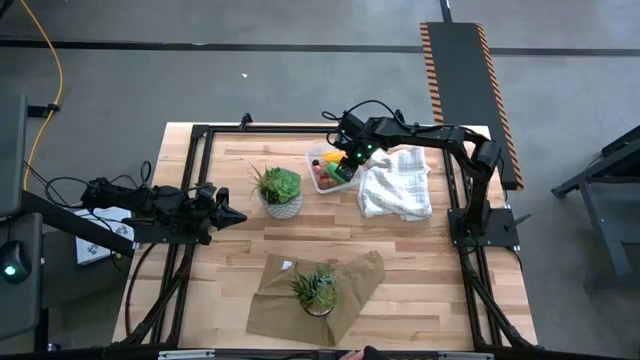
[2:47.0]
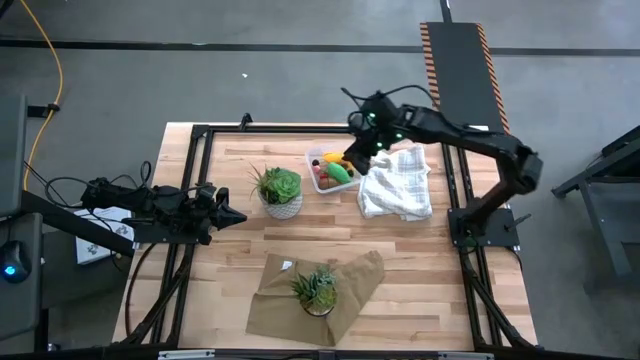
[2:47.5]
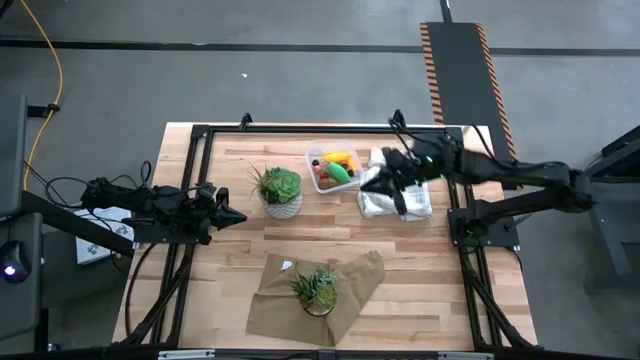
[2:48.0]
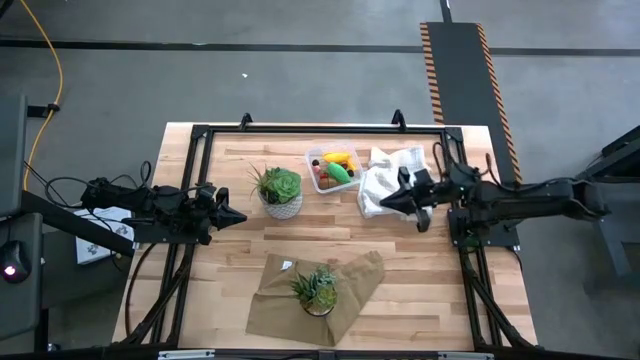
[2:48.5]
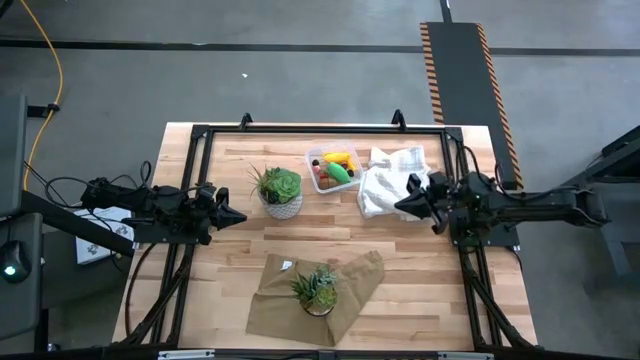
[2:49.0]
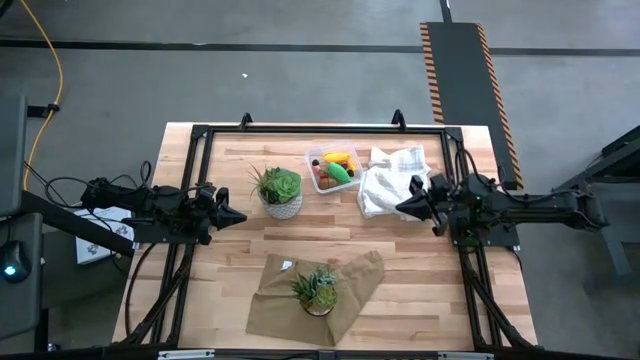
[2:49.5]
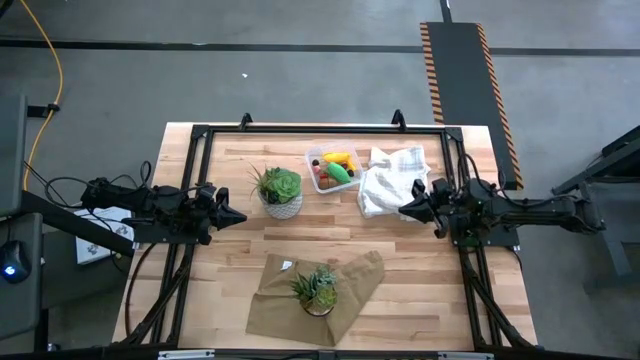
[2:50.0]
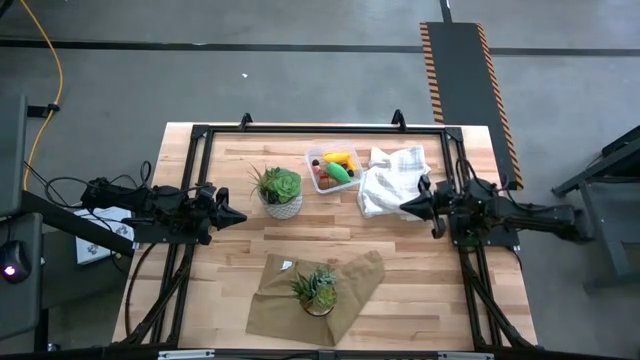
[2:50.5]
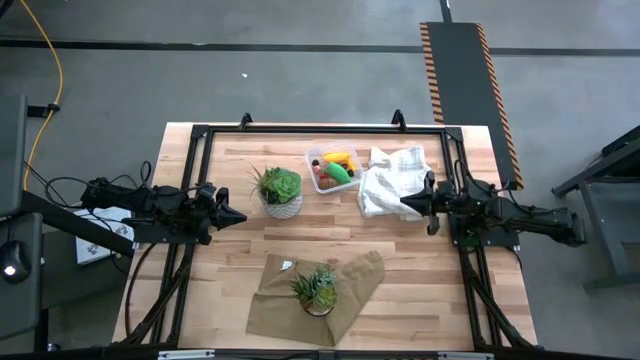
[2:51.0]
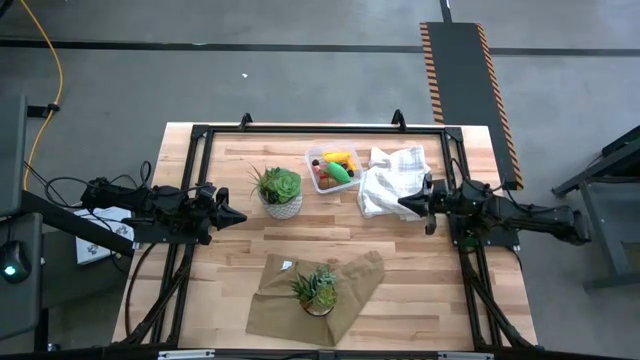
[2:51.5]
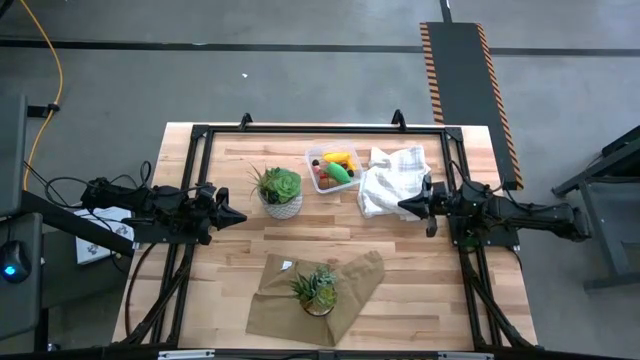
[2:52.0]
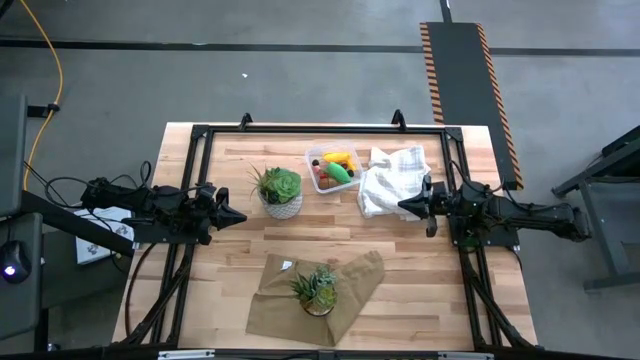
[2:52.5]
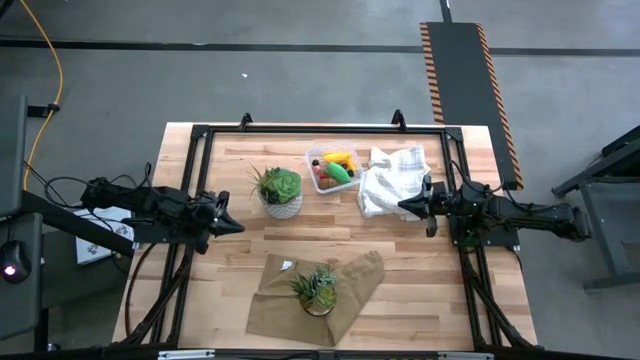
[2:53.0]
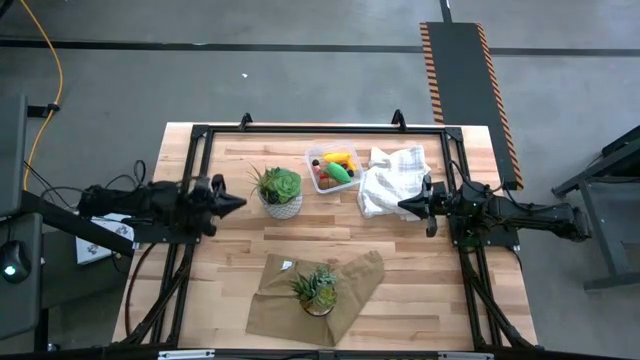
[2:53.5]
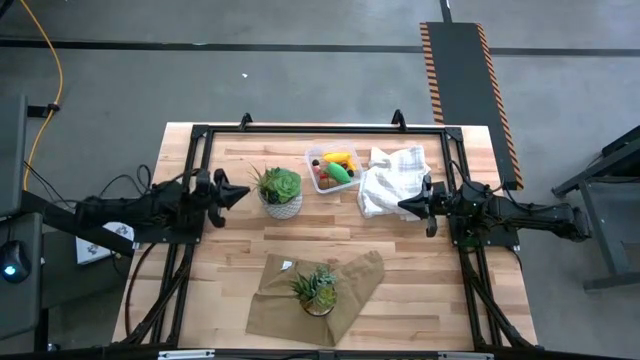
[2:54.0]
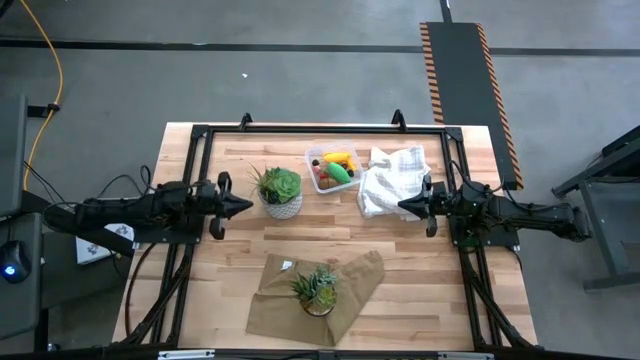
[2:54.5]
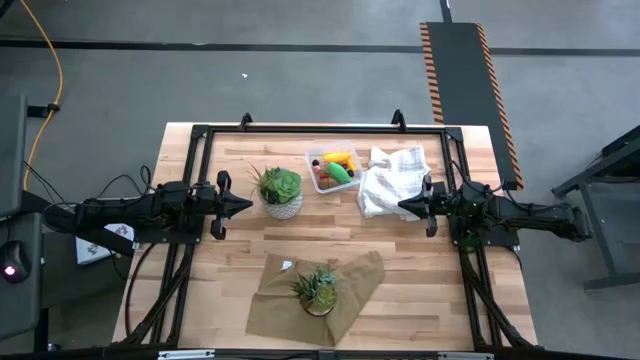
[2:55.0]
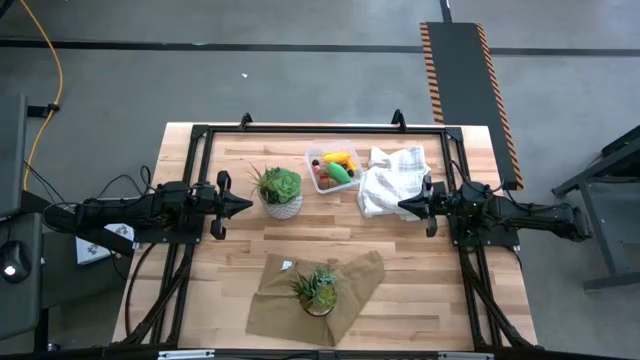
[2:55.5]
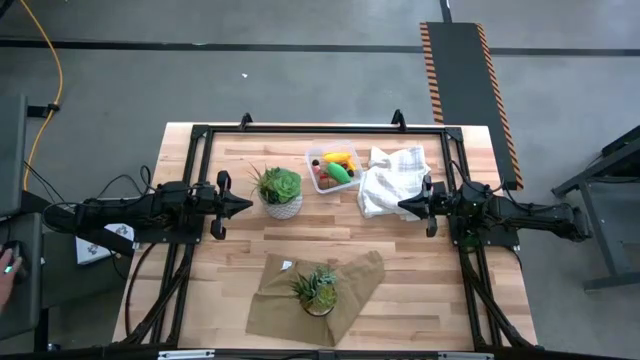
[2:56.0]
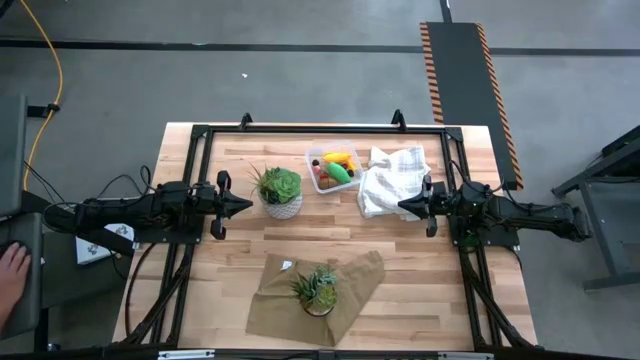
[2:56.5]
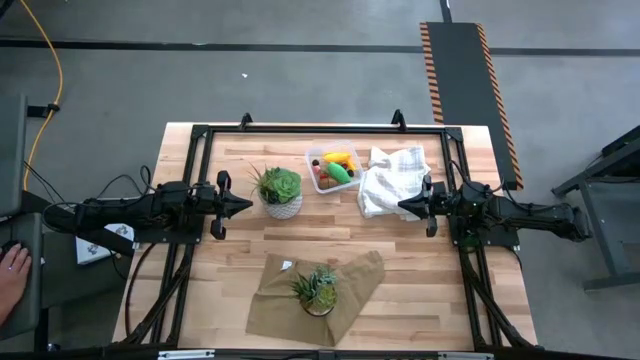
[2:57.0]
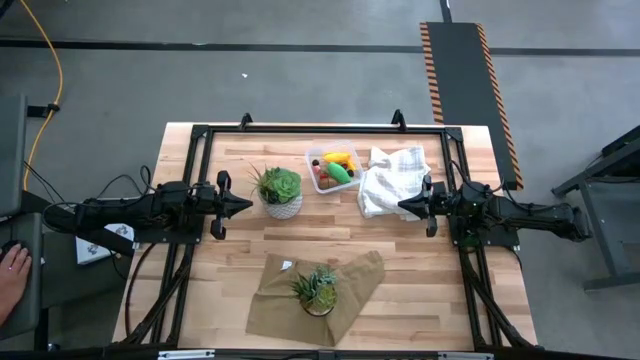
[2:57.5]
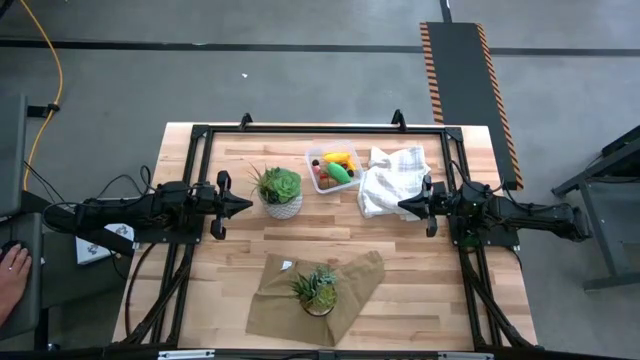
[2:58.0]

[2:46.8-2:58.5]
Task: Pick and placing Produce into tupperware
Return to Home Position

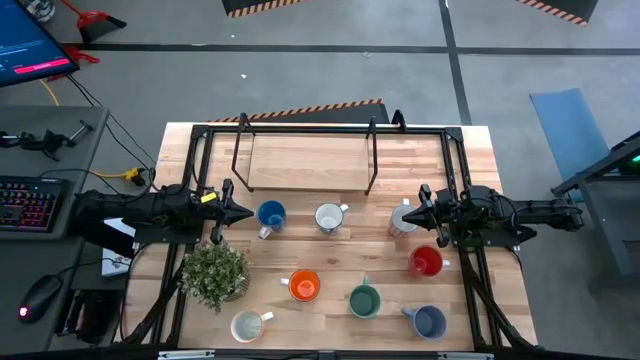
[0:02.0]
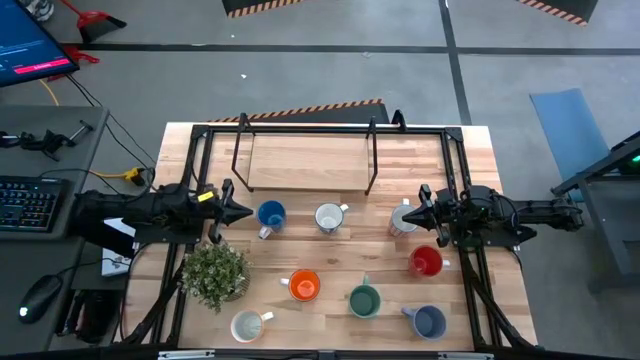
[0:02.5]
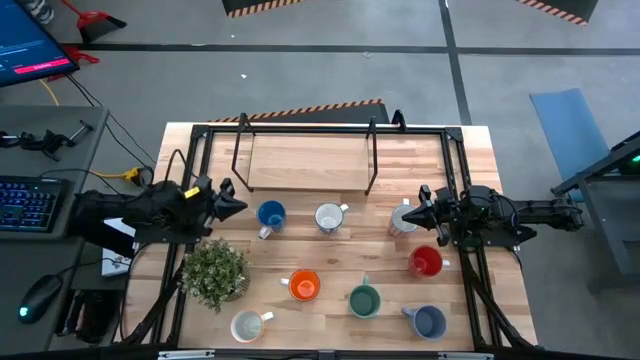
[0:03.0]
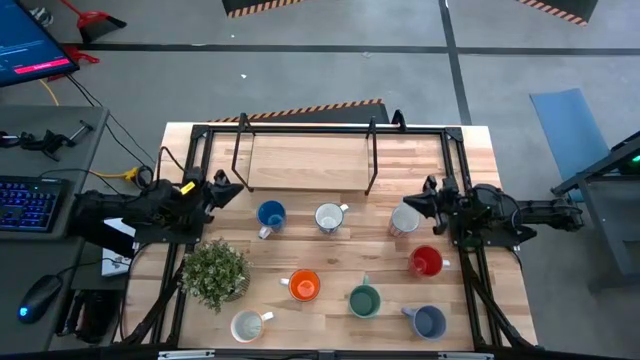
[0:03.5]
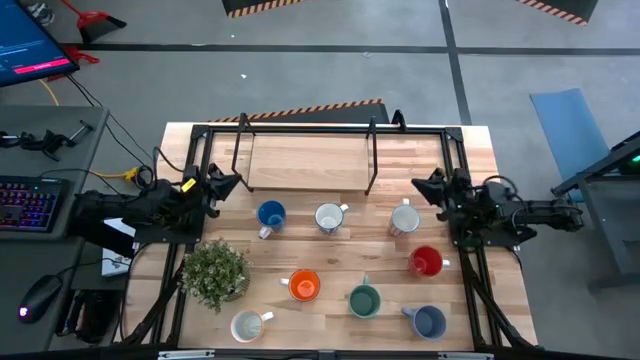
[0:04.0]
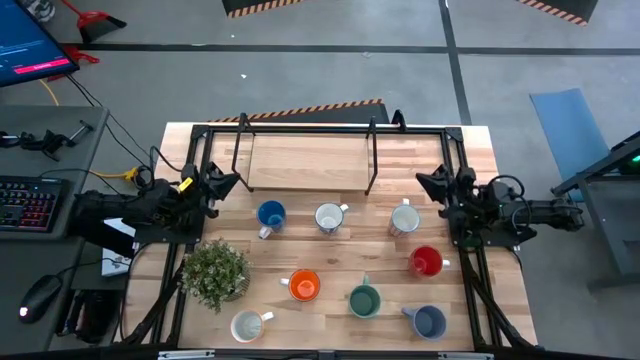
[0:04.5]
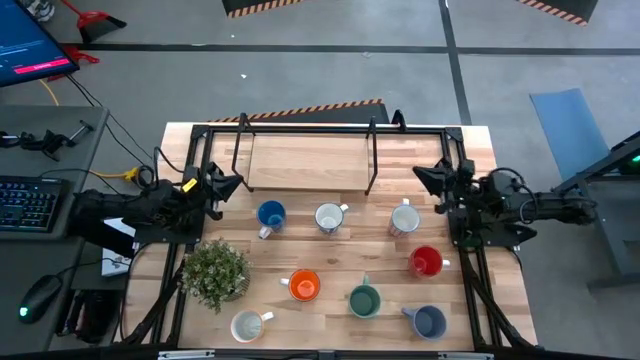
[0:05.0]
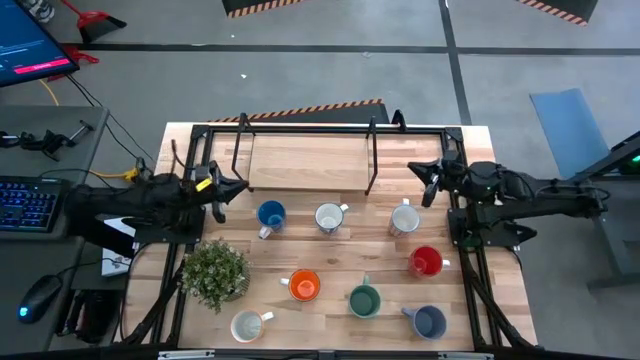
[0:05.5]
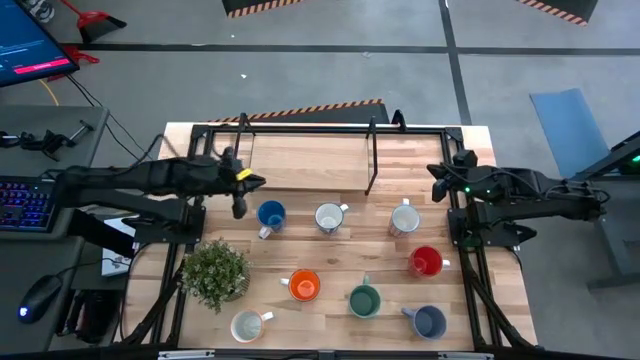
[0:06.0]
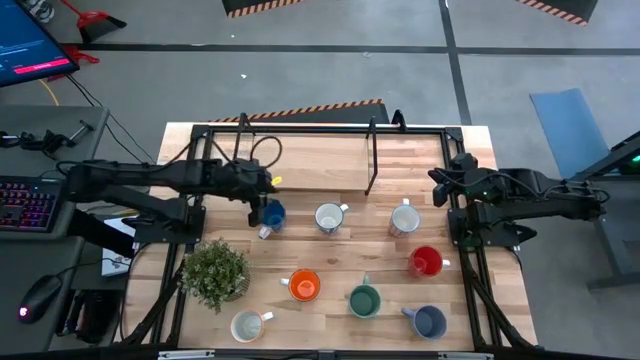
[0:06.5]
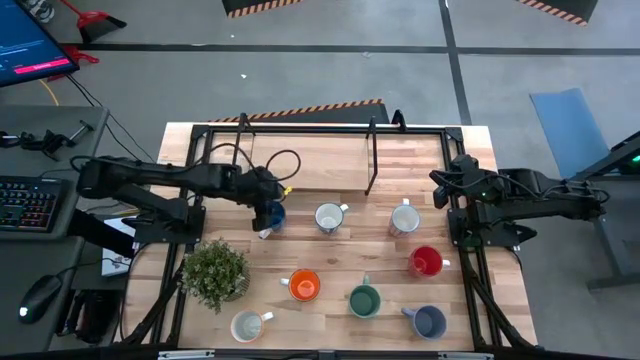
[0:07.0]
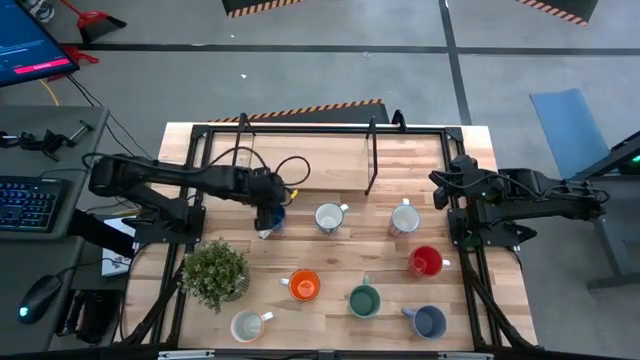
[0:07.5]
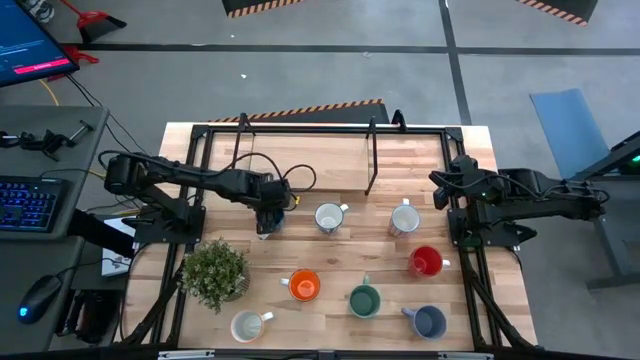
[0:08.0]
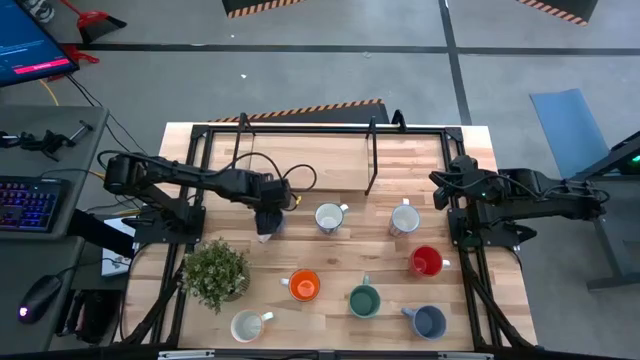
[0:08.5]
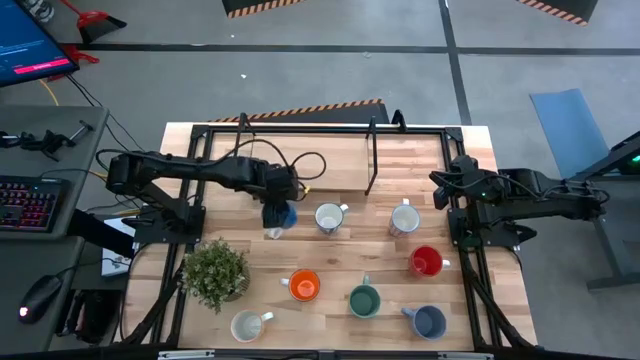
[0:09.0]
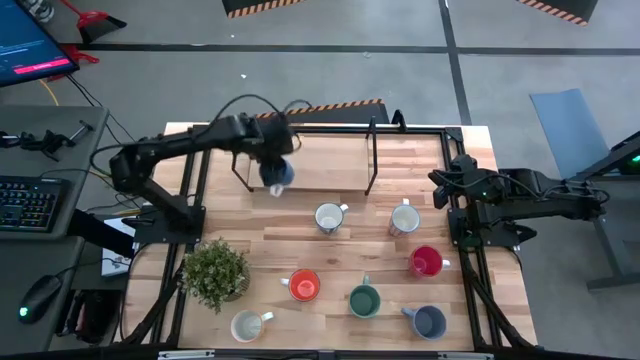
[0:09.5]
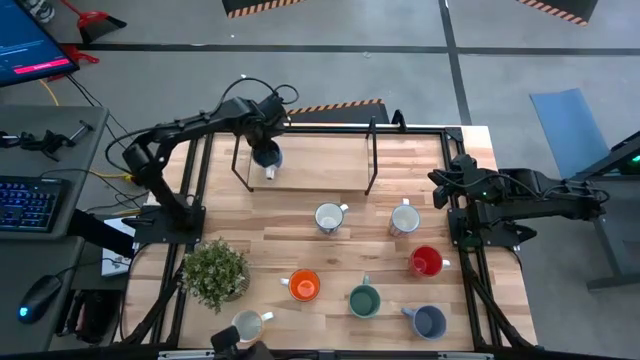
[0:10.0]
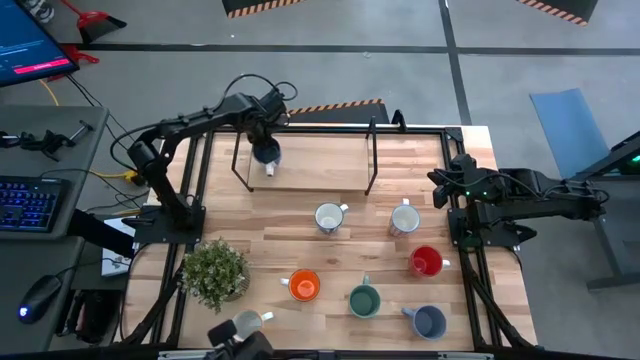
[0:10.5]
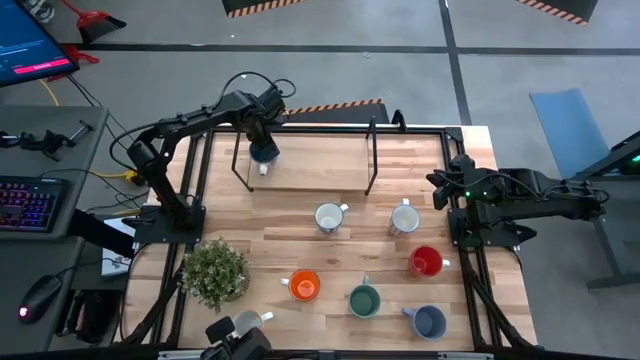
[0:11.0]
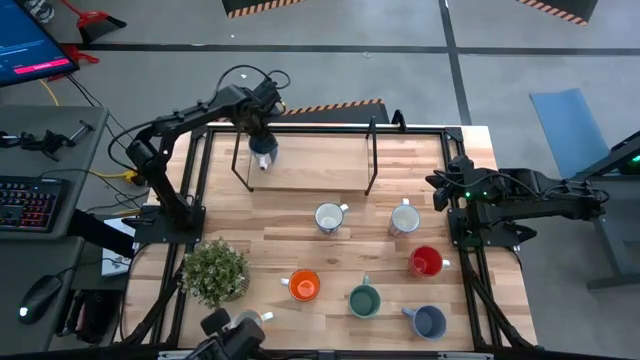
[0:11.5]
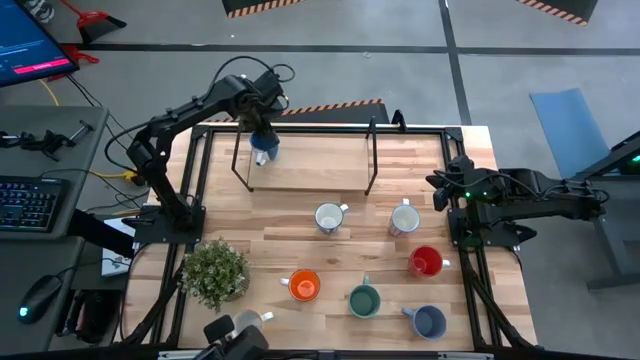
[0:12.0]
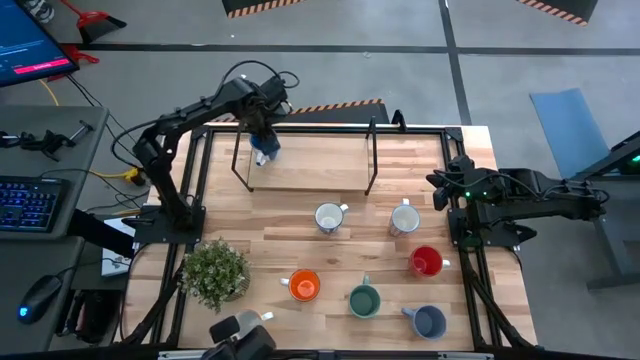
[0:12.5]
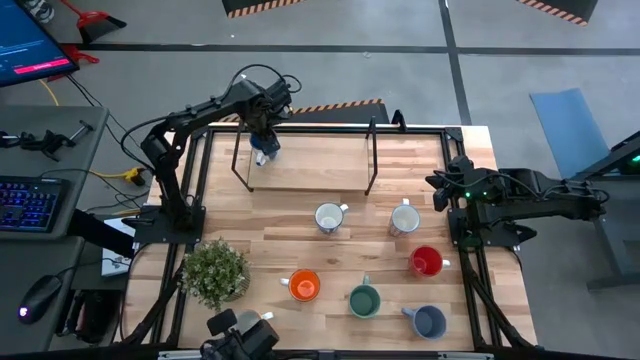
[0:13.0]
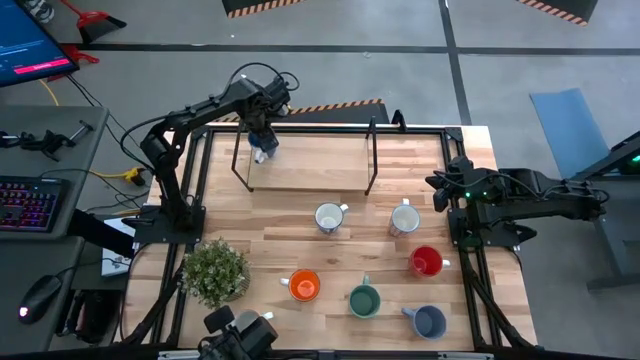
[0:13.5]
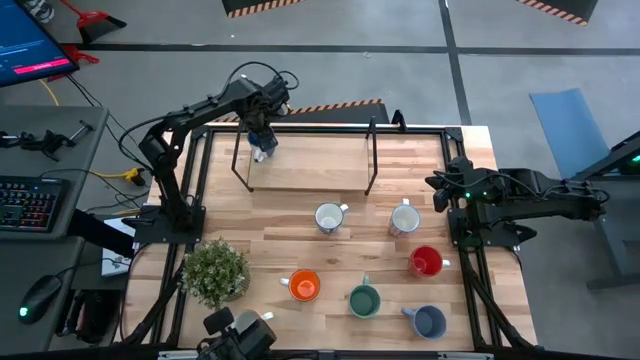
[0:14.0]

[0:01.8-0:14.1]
Task: Place coffee mugs
Put the blue mug on the shelf
